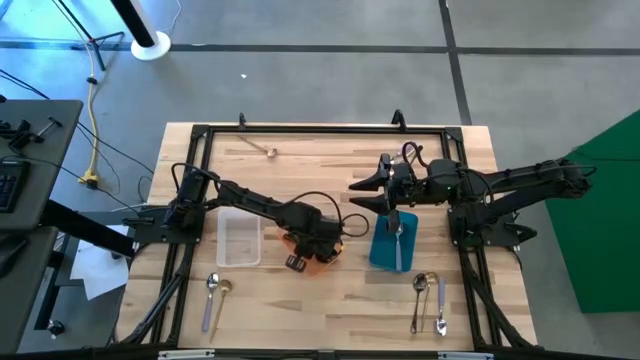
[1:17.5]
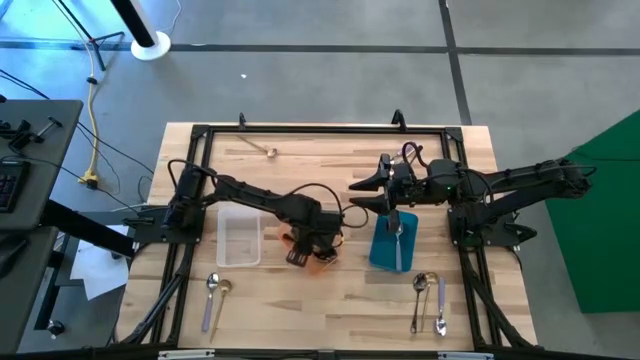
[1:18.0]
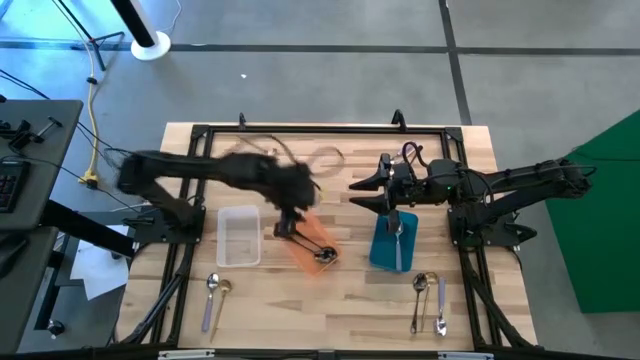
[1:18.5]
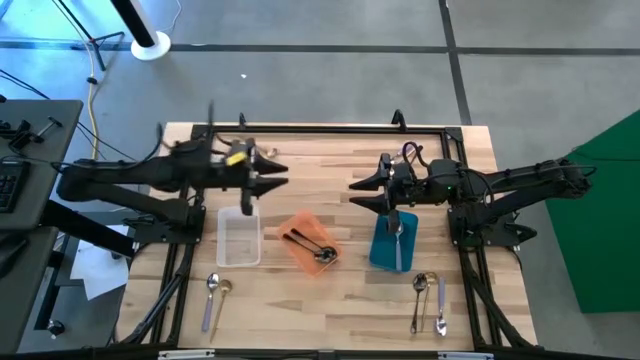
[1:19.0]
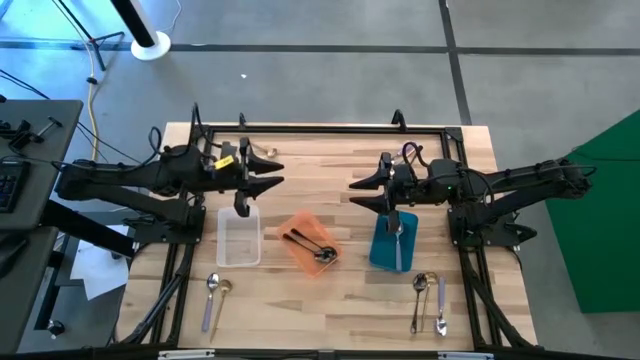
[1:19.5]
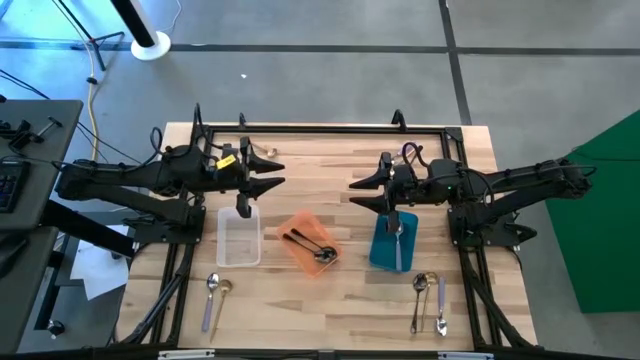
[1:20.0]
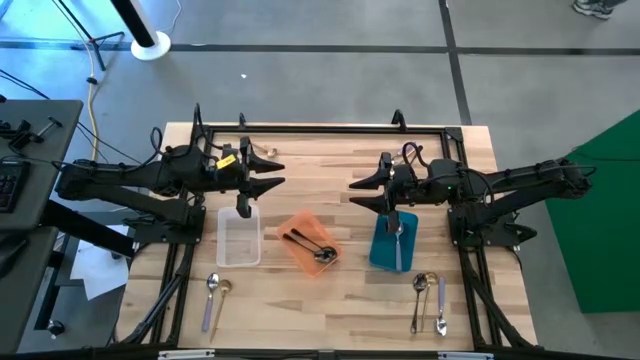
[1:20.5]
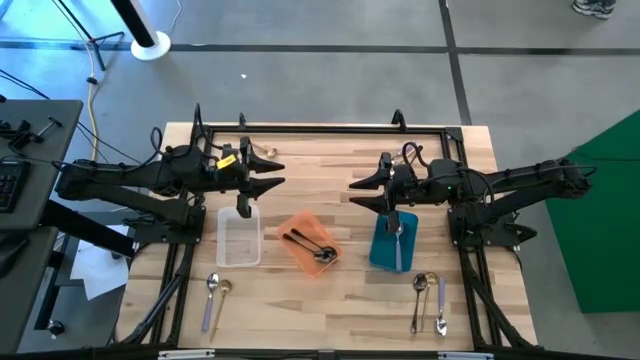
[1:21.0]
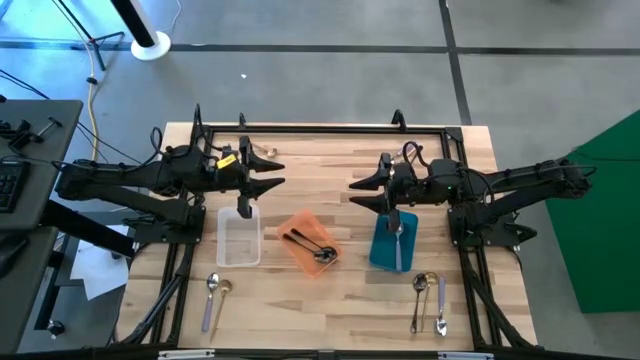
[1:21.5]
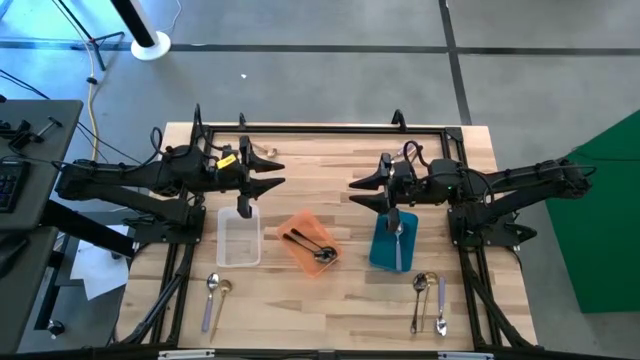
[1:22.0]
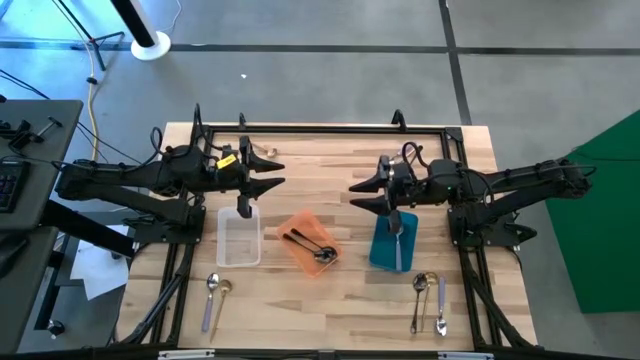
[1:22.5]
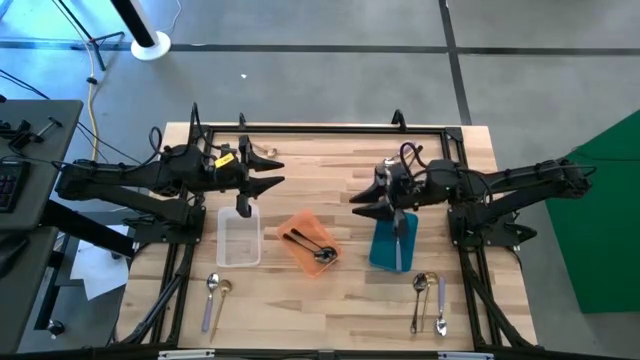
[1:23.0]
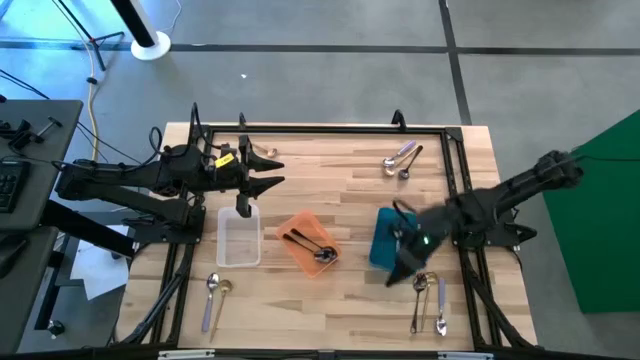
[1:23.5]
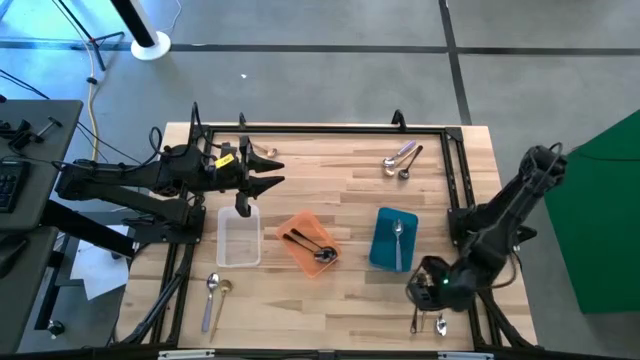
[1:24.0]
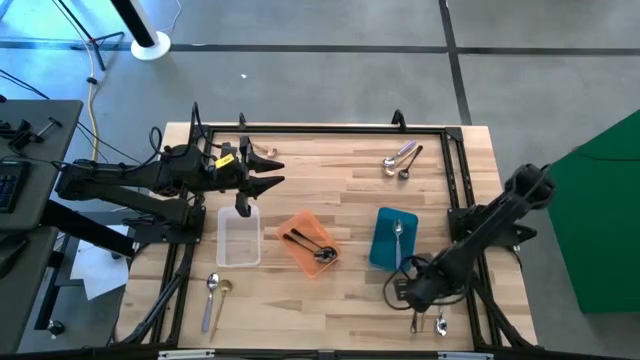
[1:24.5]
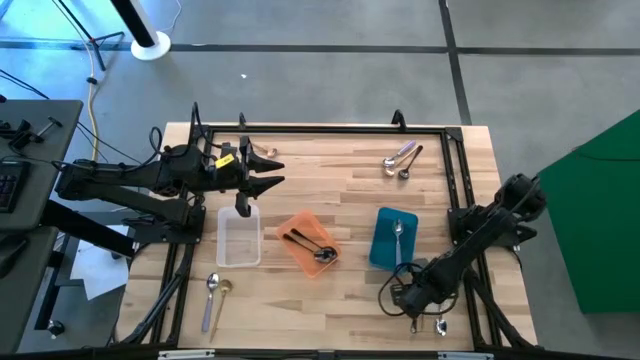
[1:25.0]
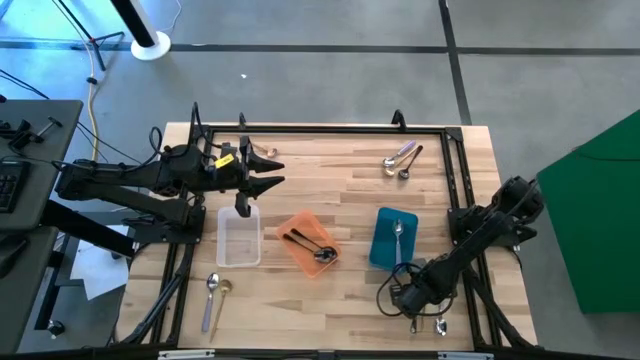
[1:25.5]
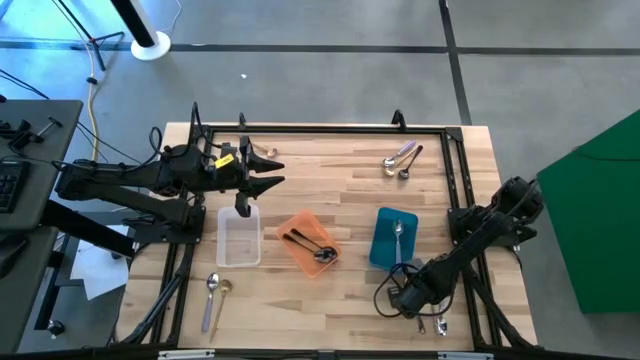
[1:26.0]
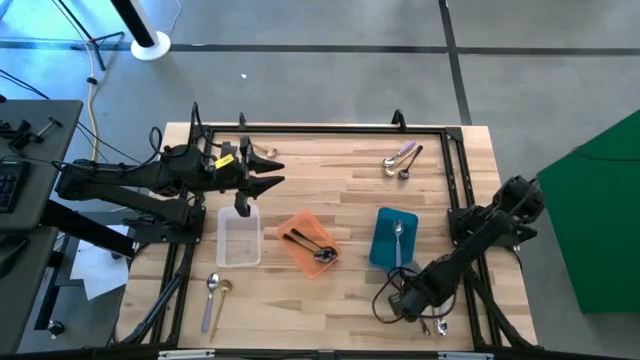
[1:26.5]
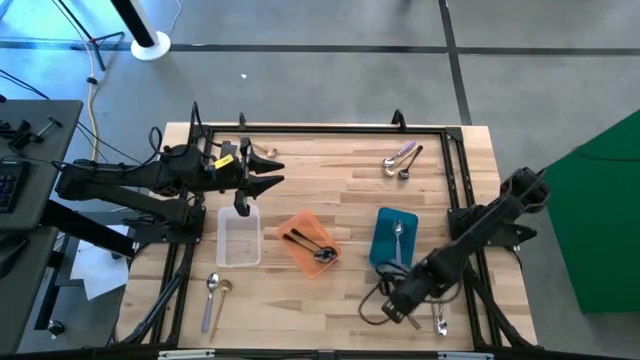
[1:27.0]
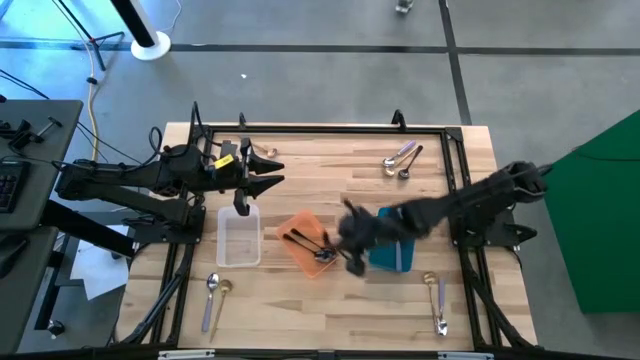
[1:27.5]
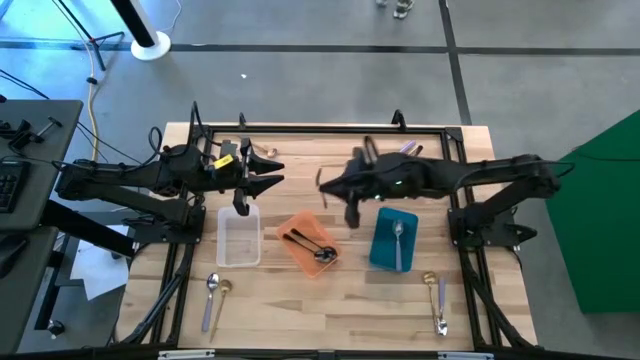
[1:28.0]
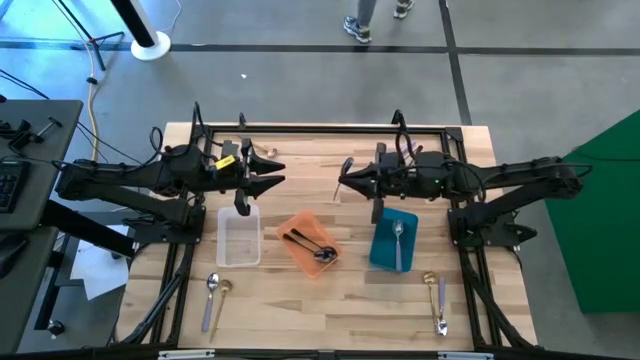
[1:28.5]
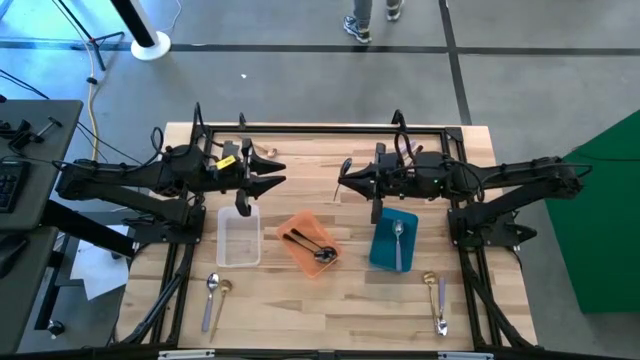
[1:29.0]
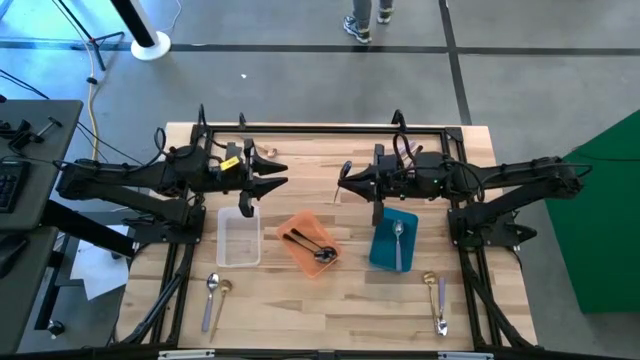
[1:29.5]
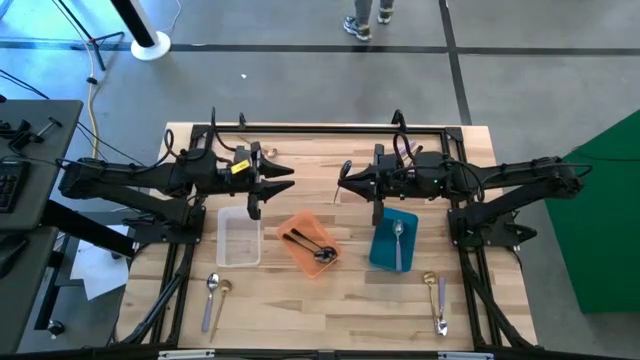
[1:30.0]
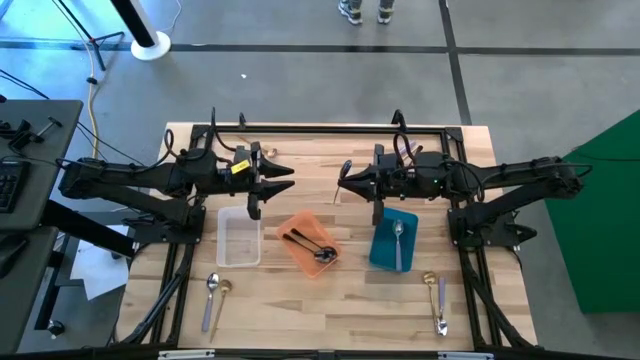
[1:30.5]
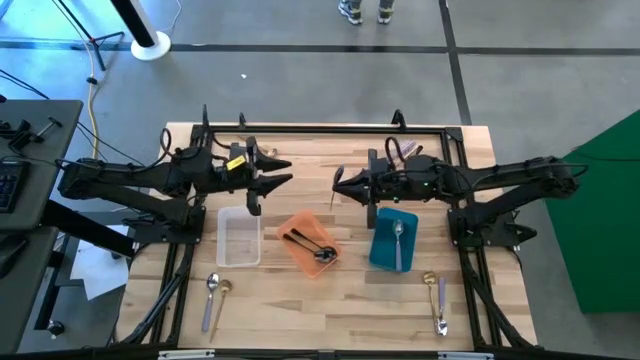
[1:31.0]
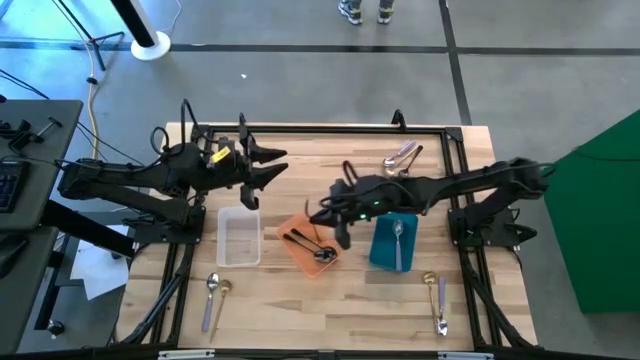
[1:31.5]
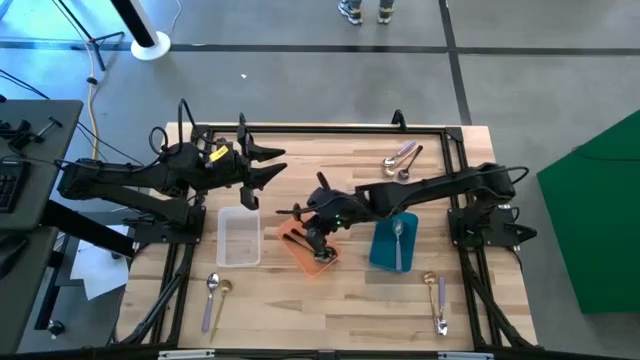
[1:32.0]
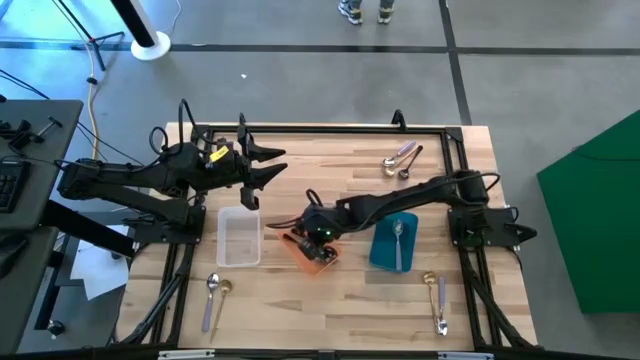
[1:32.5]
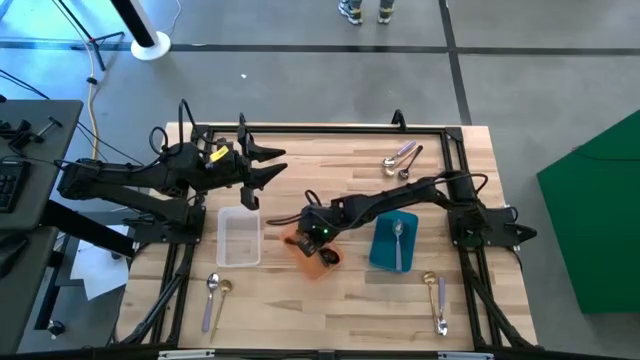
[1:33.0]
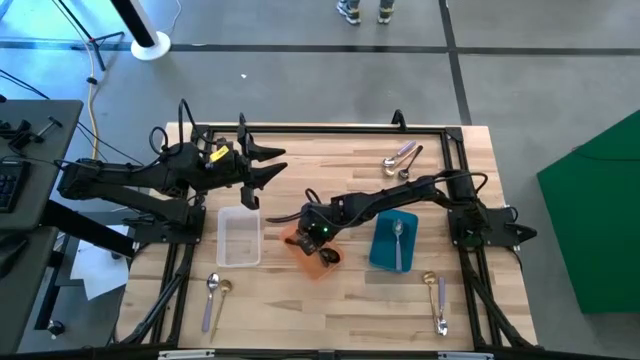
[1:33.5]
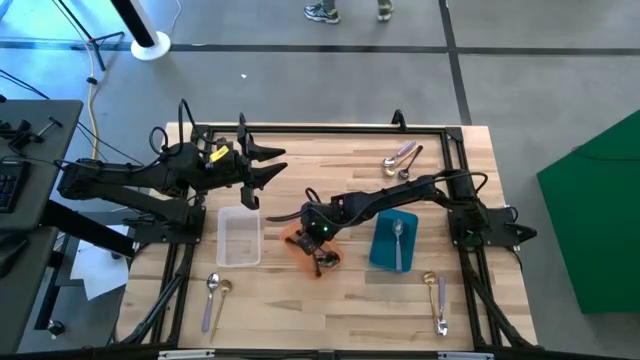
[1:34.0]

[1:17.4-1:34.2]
Task: Sort silverware by color (type)
Put the bottom black spoon into the orange bin
